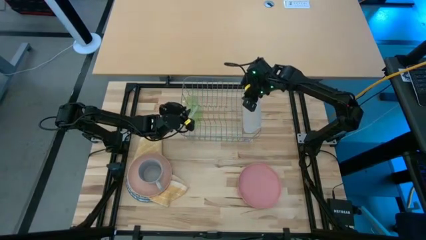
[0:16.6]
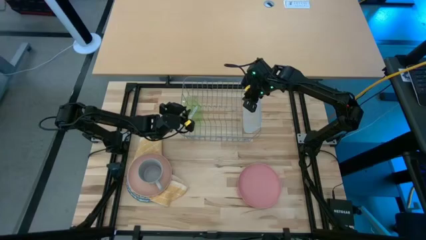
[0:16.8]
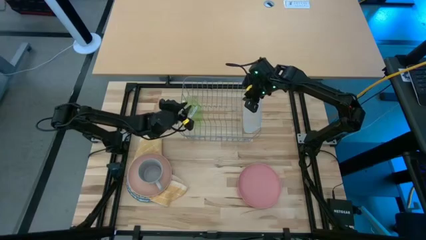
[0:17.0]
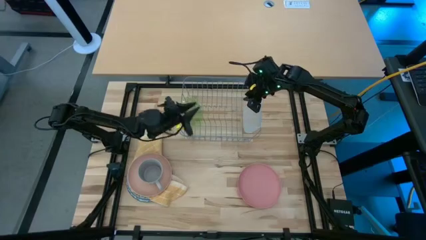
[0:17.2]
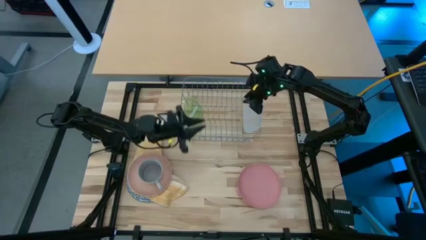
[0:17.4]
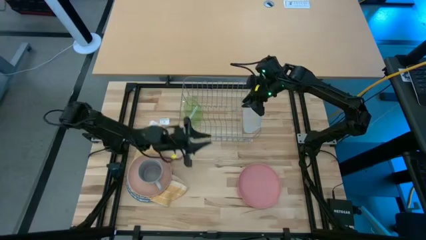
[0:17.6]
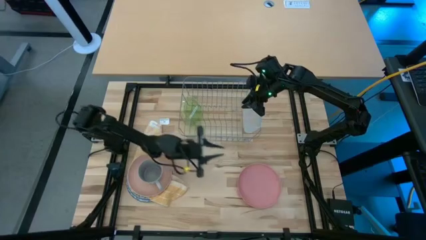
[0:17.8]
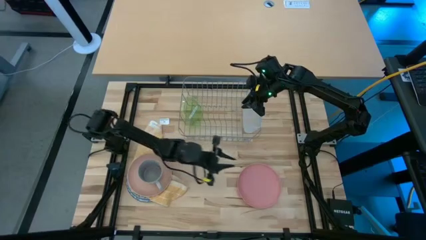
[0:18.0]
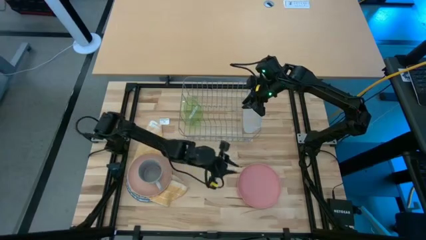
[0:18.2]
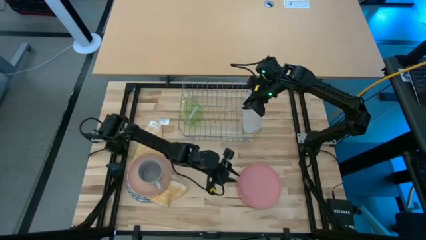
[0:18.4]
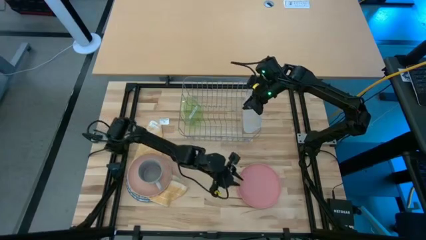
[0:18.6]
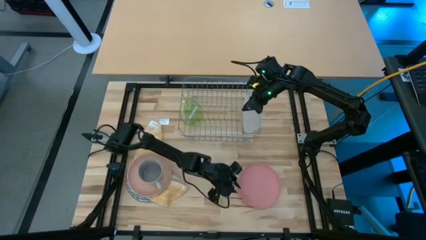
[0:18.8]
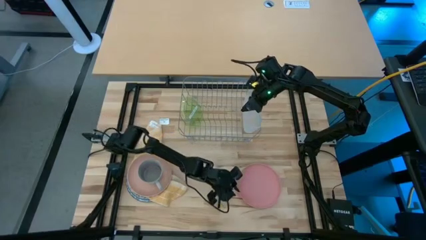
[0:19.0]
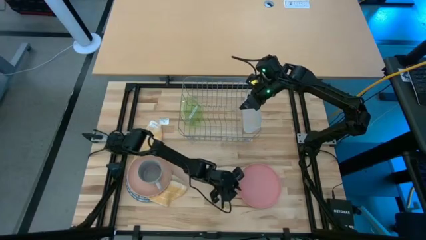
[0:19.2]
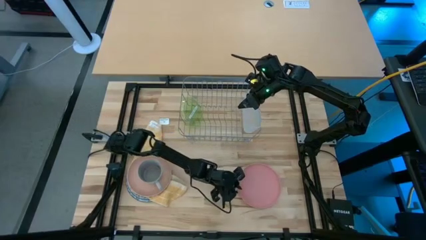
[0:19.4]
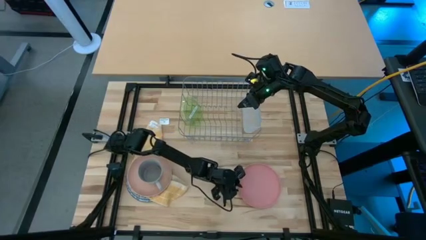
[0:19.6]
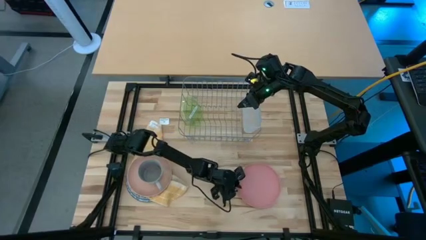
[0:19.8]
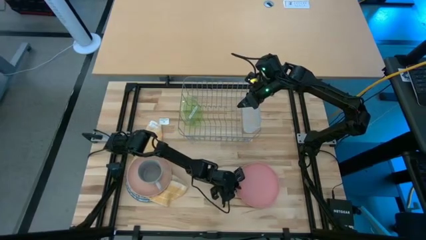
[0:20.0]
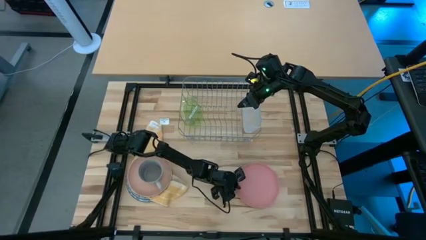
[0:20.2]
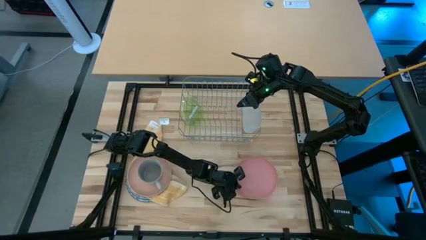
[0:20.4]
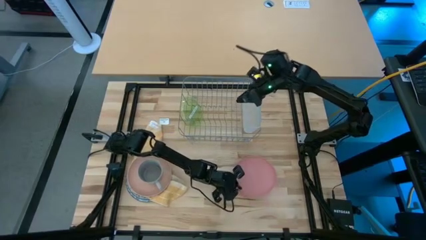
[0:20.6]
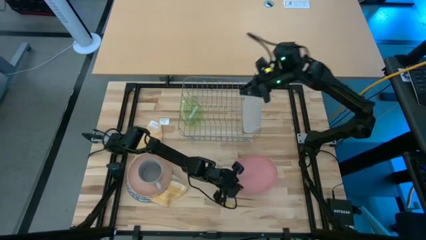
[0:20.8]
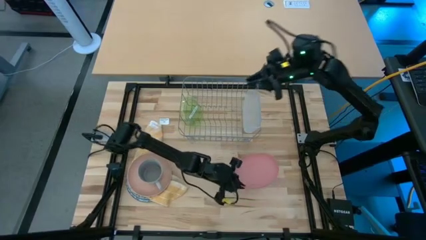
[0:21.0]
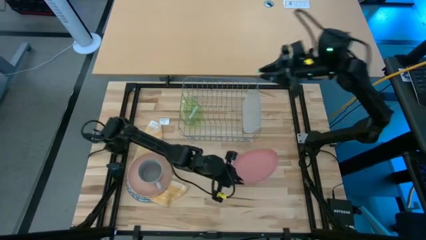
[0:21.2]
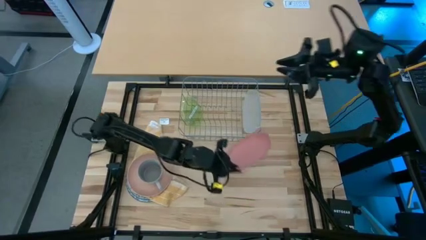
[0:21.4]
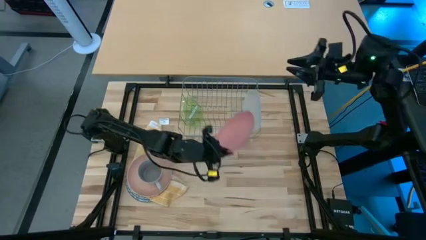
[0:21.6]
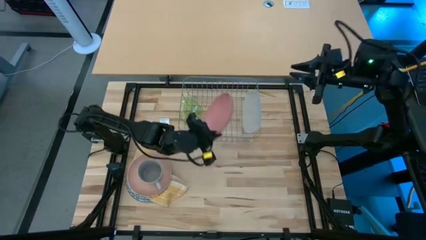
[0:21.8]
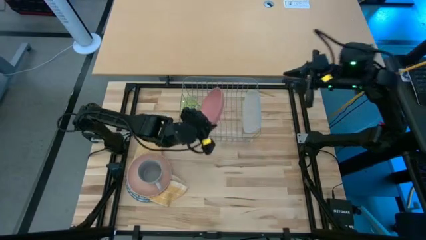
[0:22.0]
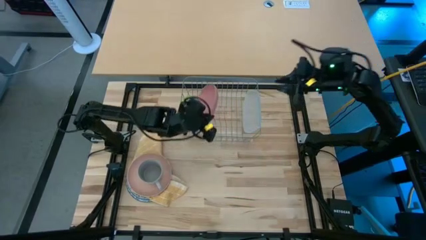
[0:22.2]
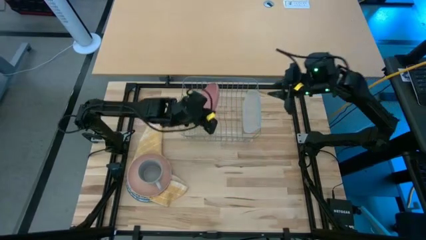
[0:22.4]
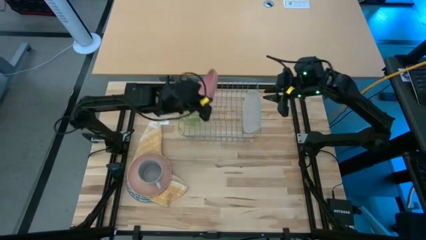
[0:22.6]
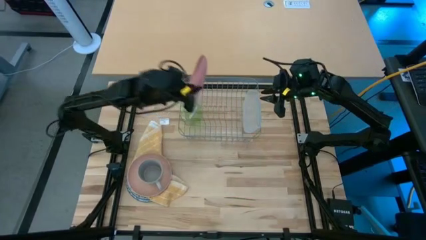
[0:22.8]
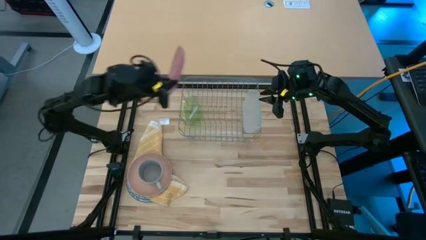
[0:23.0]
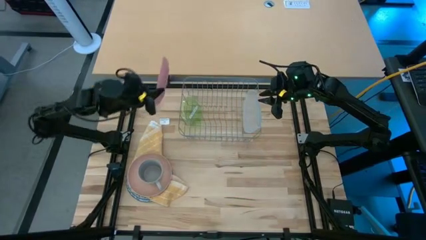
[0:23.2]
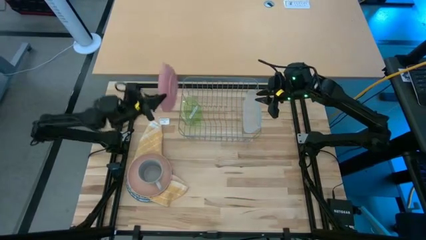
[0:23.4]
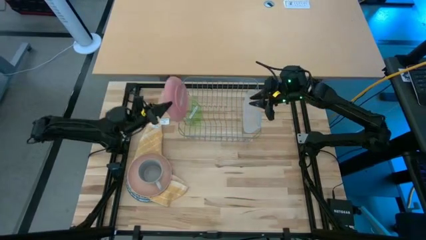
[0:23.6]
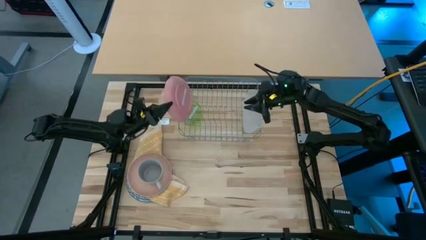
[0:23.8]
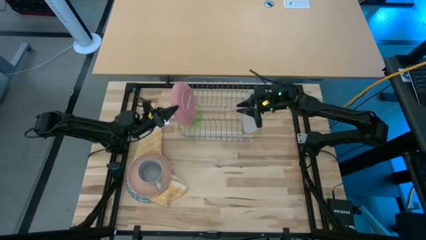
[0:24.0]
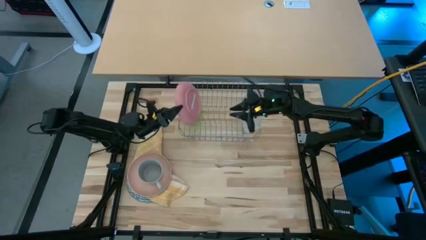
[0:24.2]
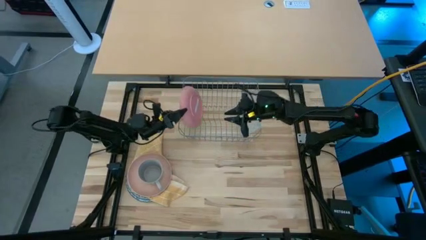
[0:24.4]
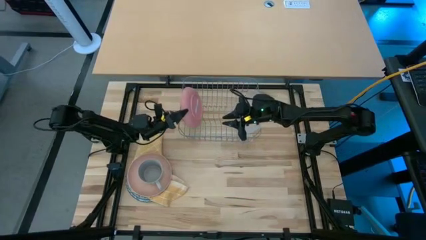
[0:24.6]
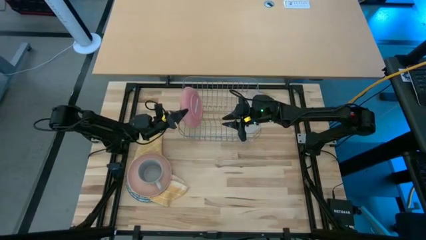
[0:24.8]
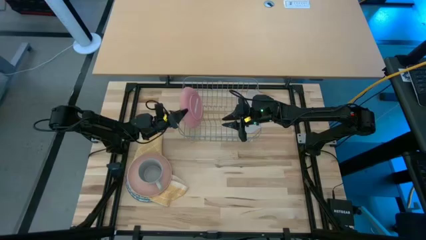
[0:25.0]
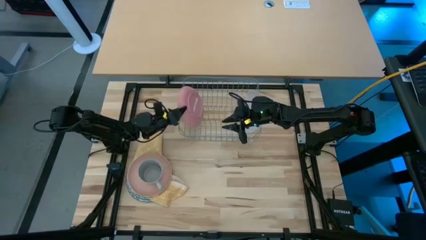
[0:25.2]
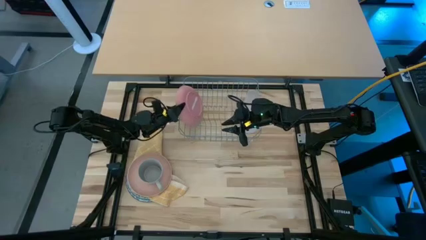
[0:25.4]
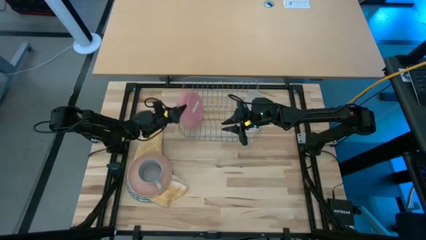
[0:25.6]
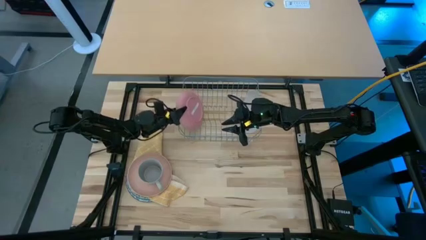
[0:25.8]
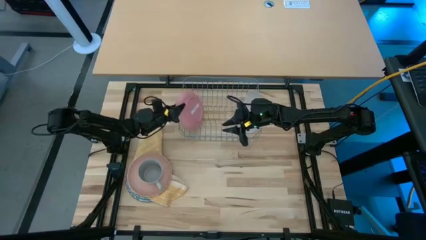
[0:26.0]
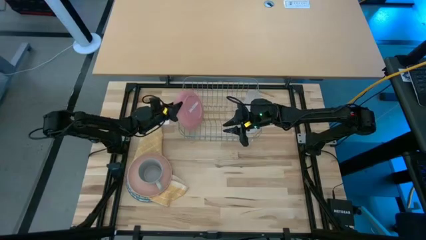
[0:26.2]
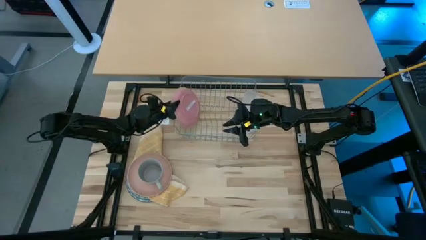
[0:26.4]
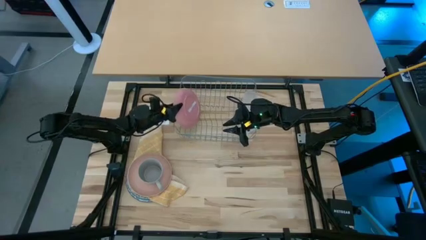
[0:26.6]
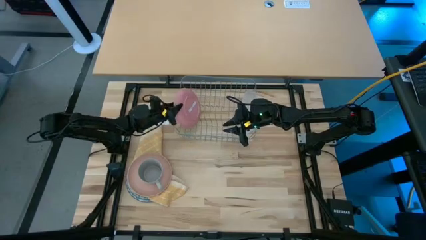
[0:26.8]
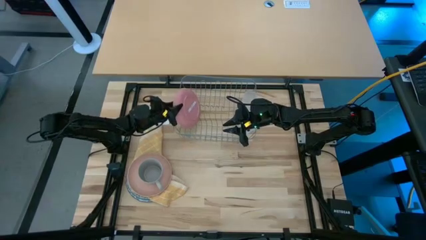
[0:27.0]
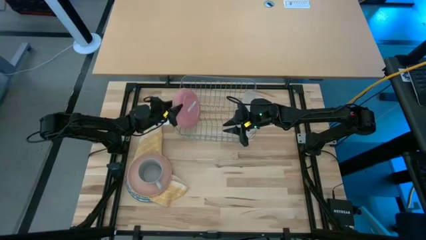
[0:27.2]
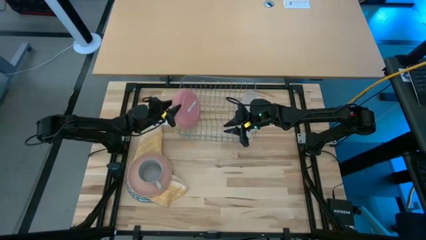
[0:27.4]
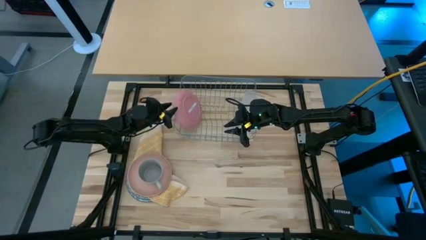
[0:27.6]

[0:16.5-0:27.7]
Task: Sort dishes
Put the pink plate into the dish rack
